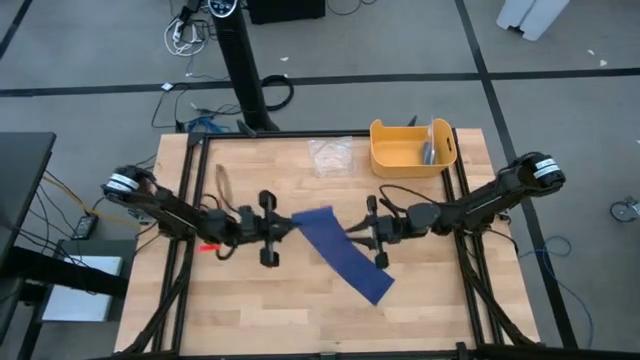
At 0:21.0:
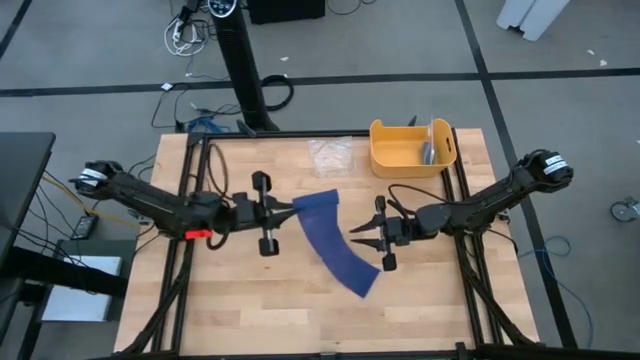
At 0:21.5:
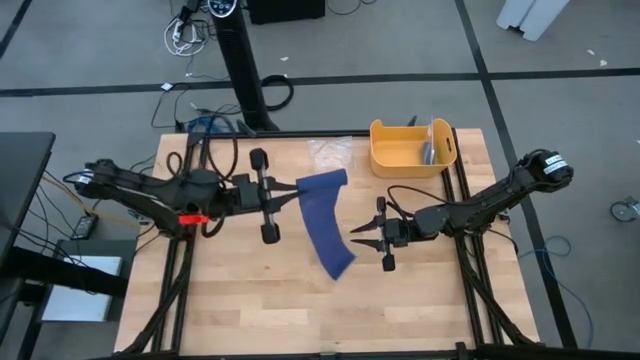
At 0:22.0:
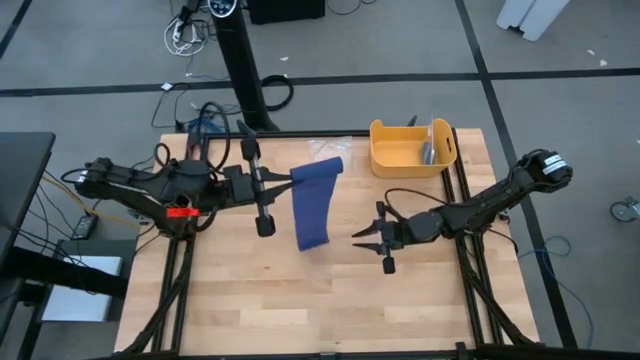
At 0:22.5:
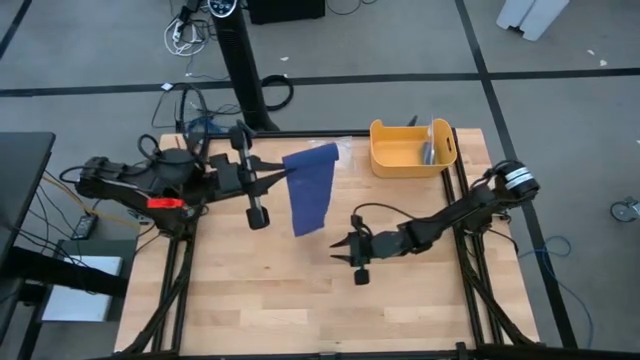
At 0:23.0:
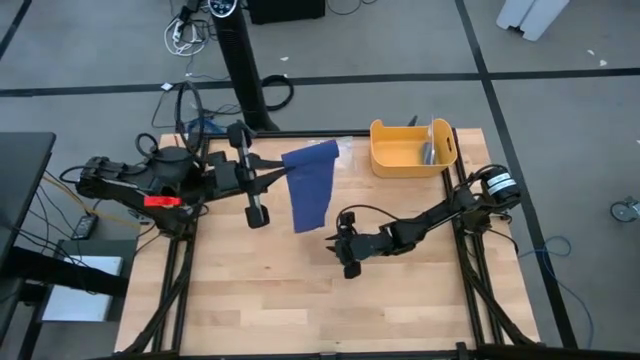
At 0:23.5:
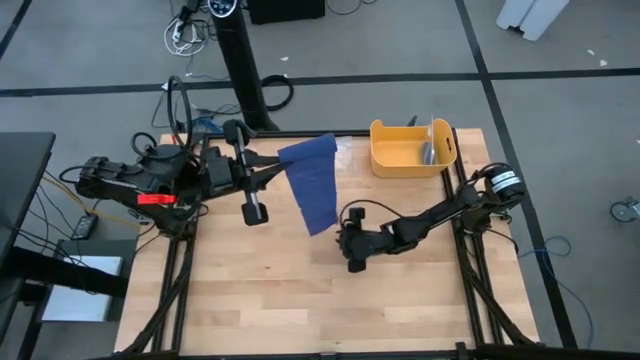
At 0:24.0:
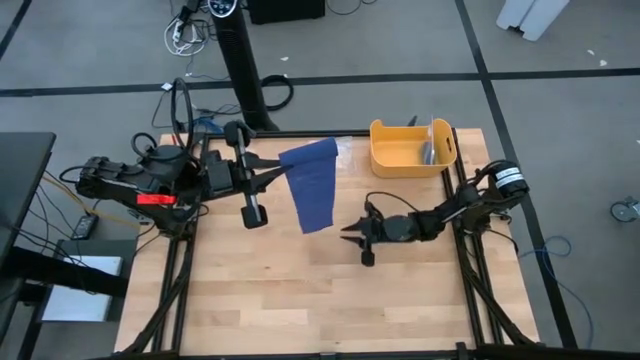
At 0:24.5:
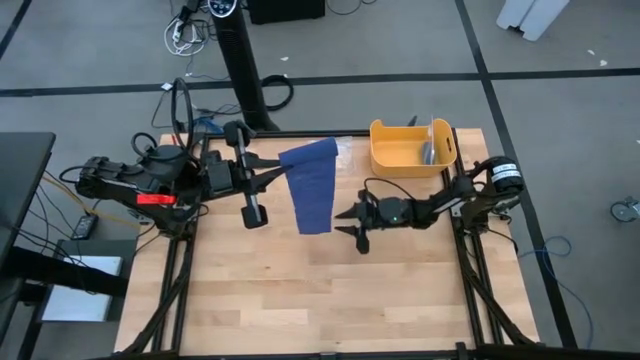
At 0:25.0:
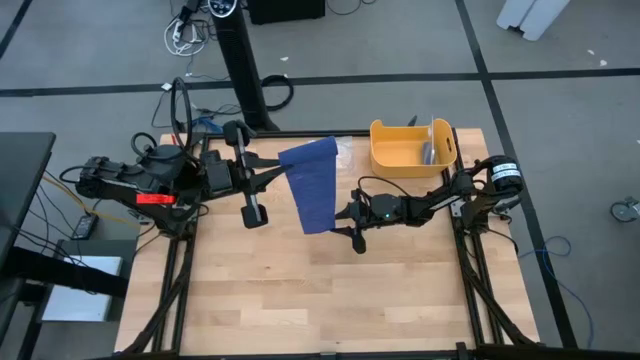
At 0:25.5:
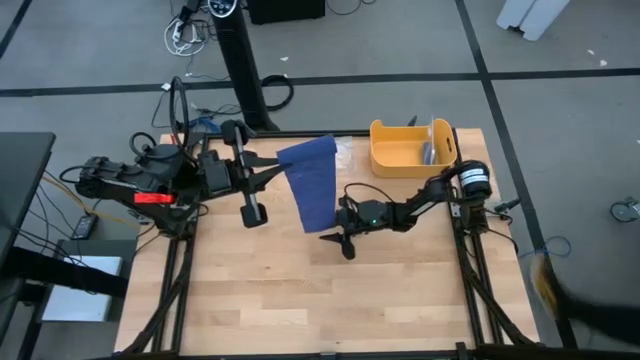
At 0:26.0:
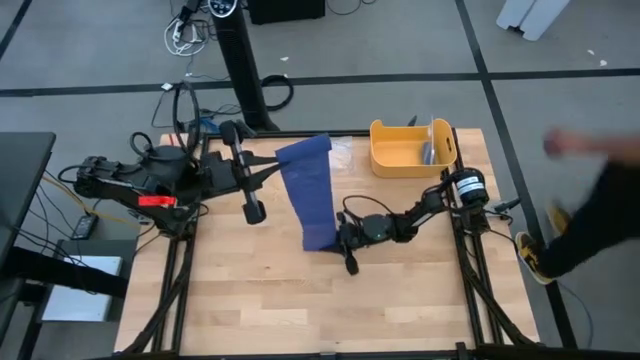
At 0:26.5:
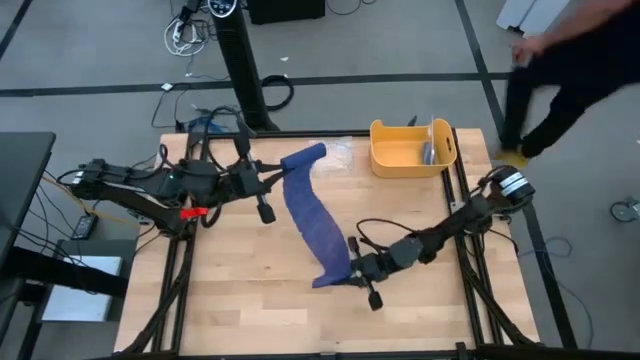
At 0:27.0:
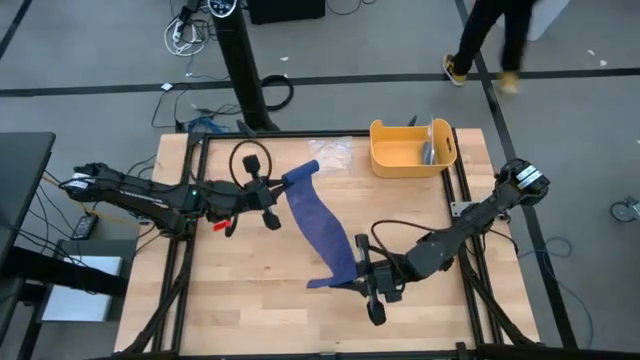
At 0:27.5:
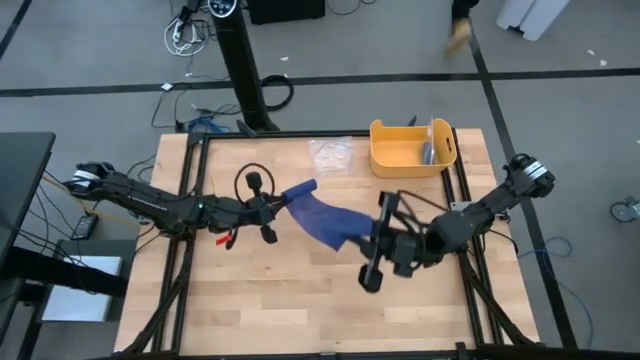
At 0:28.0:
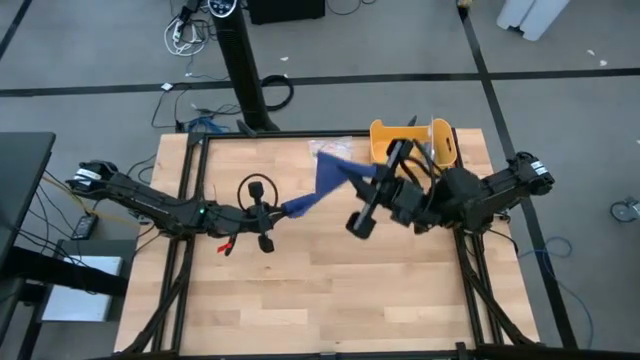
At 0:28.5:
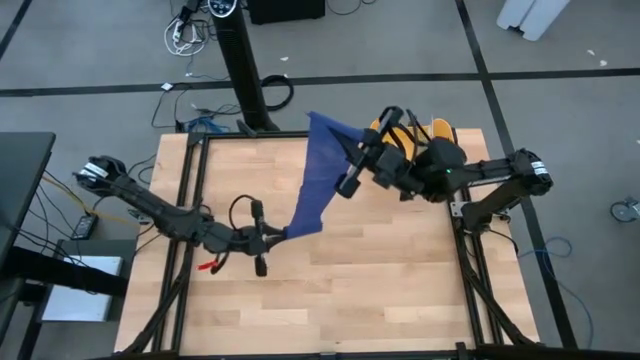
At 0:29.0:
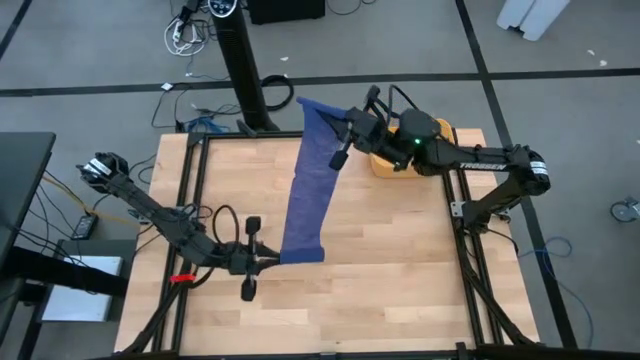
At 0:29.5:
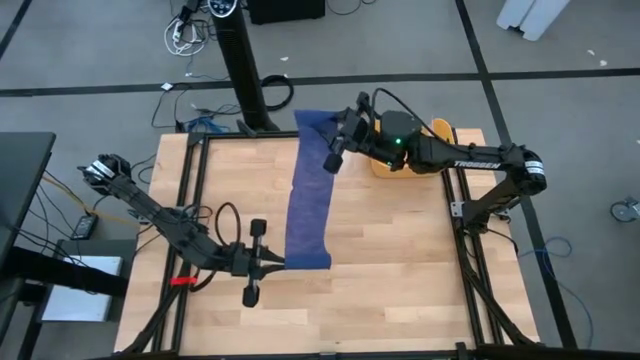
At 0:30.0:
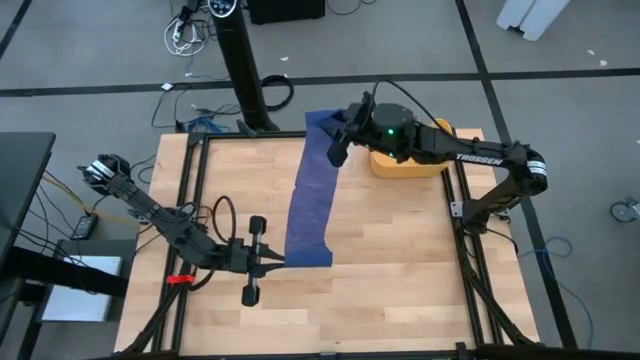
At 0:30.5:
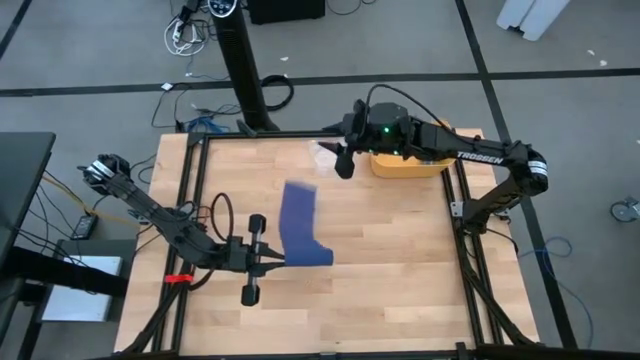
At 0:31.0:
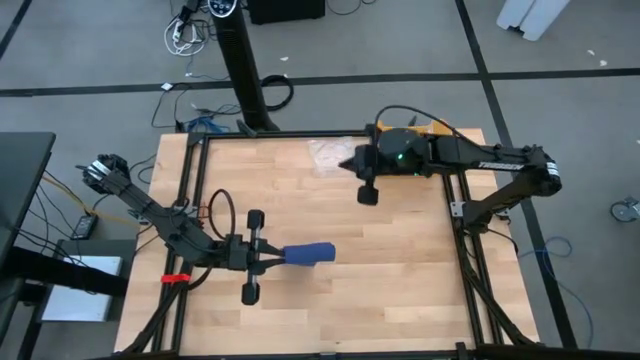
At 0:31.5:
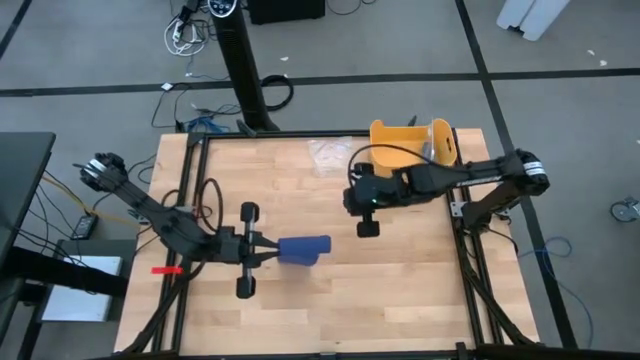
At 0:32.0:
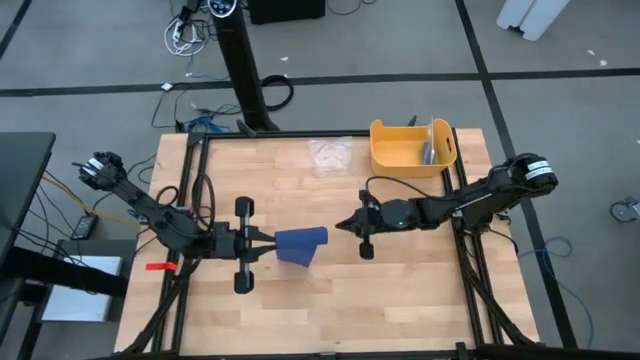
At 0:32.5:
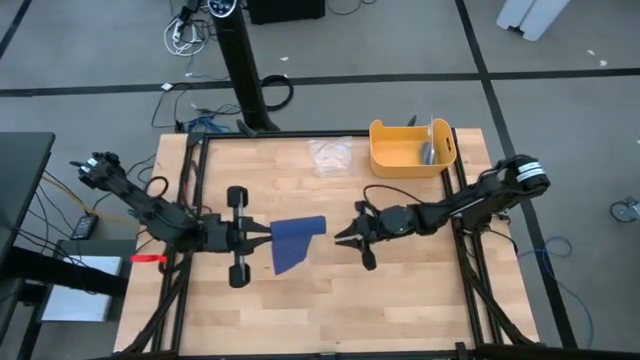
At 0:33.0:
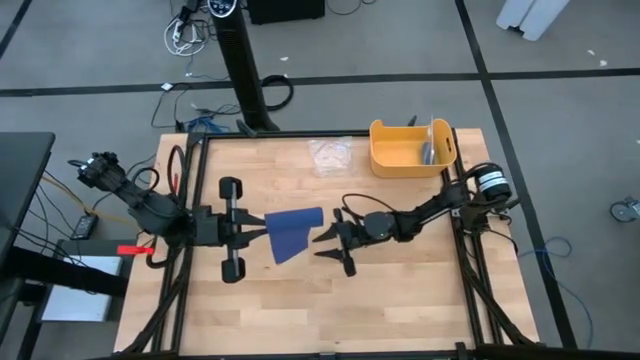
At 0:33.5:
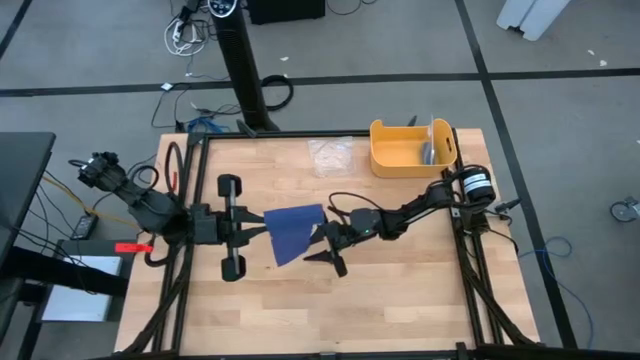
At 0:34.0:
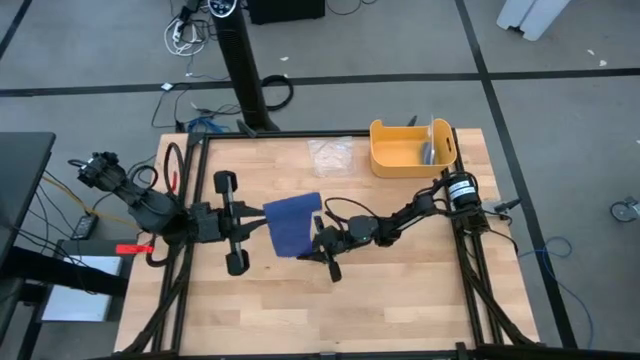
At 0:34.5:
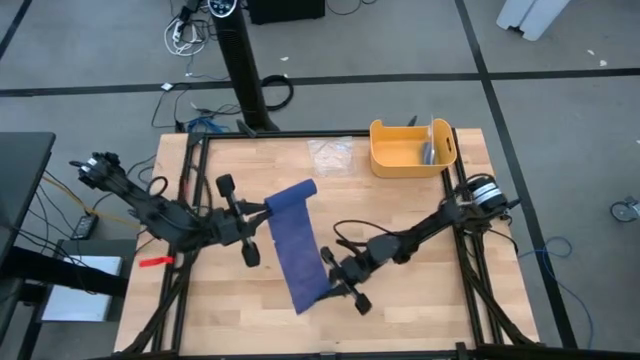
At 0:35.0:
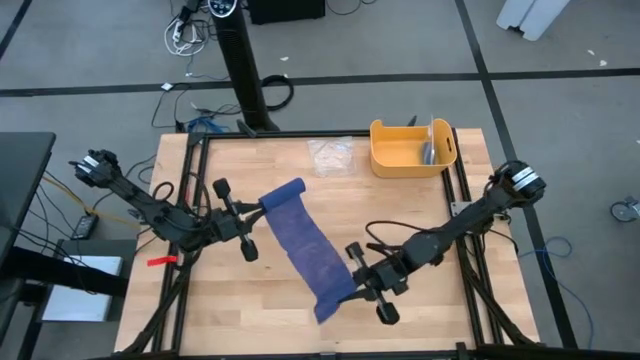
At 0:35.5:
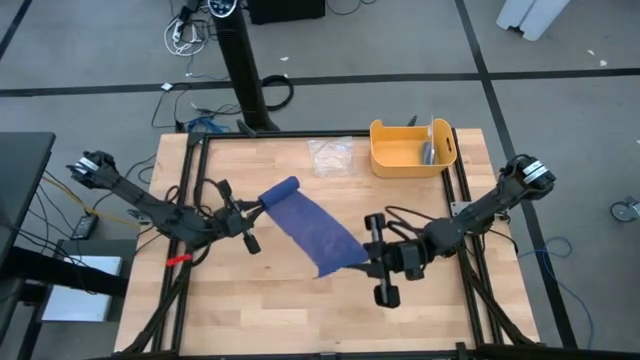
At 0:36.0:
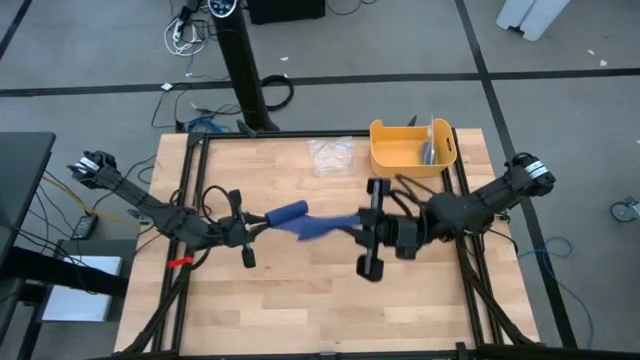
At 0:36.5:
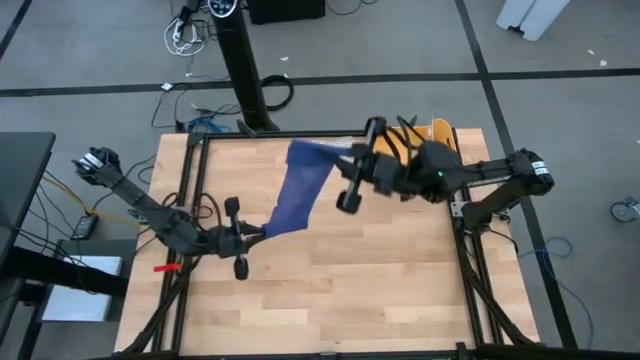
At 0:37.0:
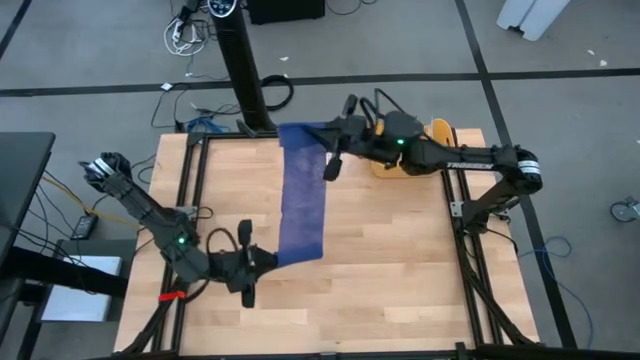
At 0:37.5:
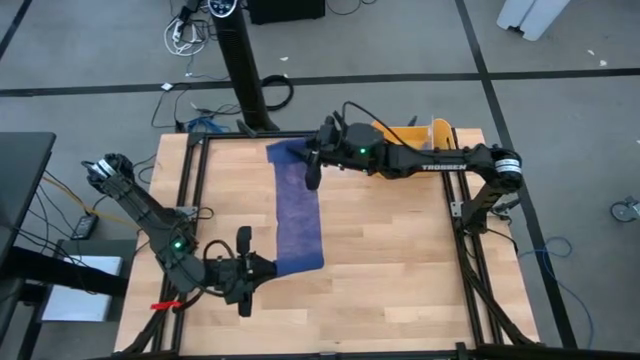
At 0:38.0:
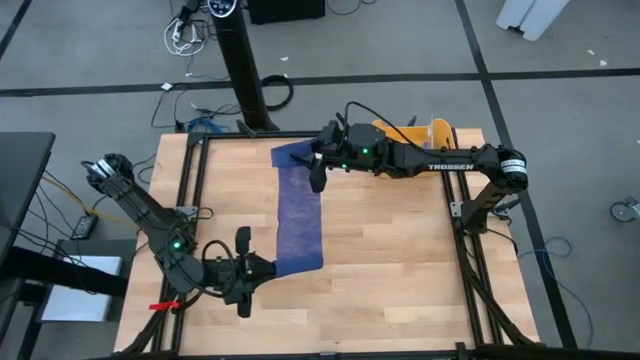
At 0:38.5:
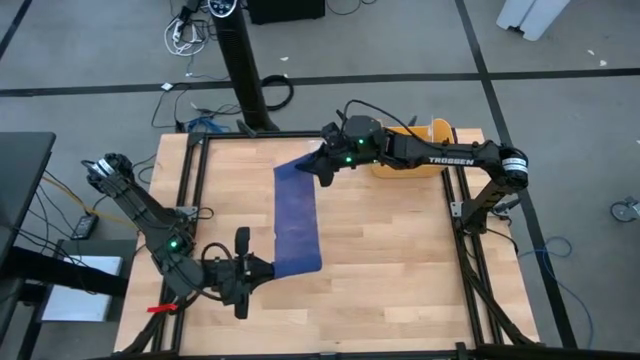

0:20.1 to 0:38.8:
Task: Roll bandage
Roll the violet bandage

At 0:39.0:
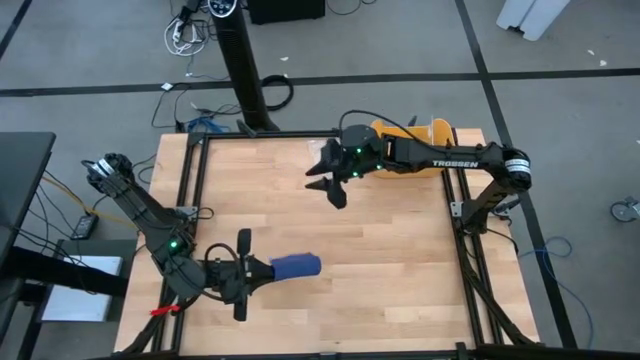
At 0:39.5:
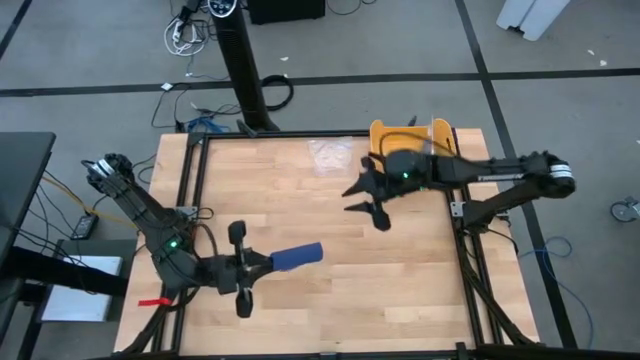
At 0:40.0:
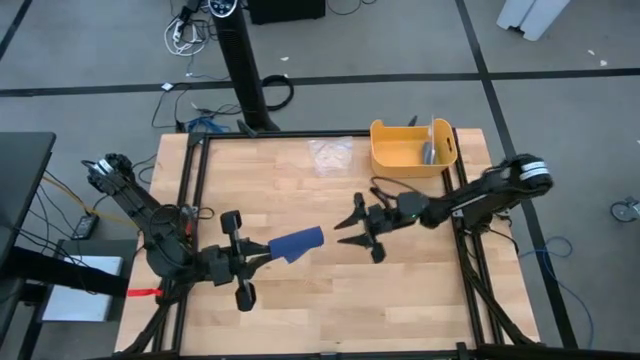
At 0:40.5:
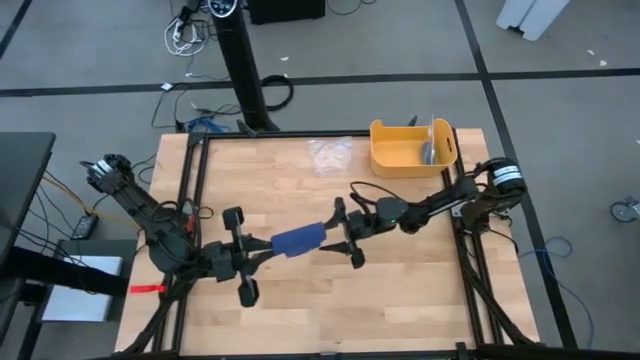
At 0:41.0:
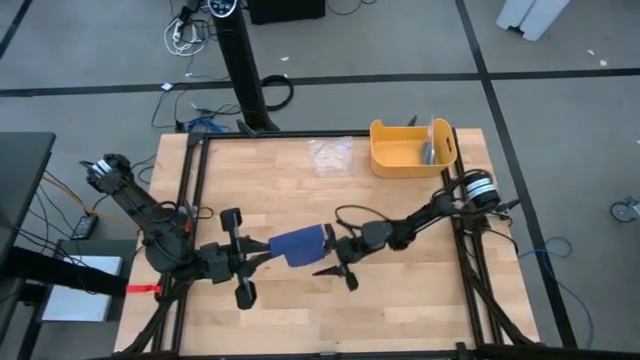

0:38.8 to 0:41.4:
Roll the violet bandage
